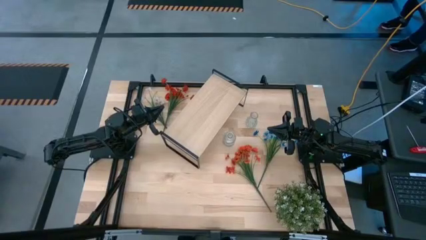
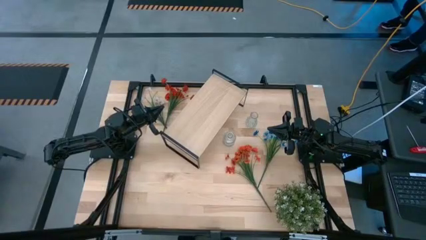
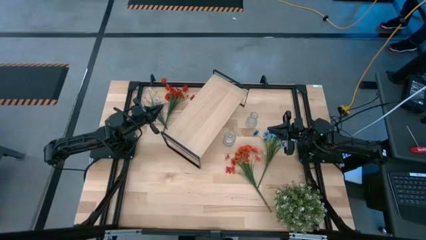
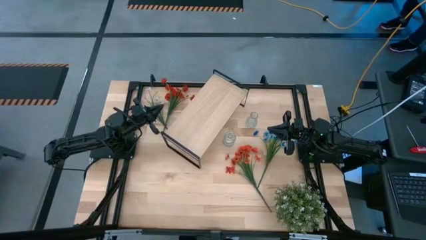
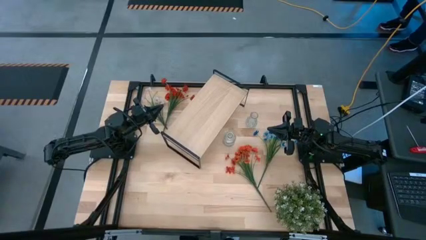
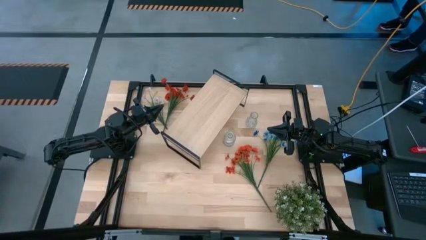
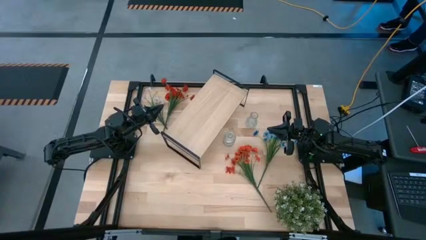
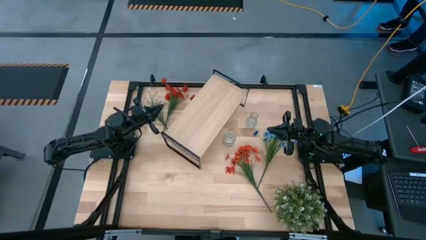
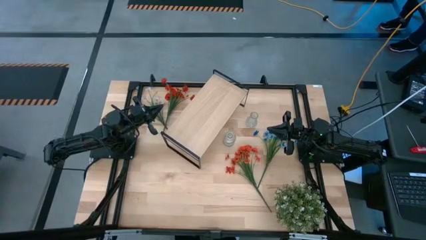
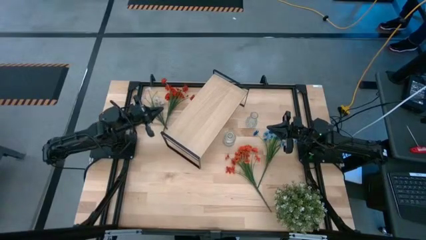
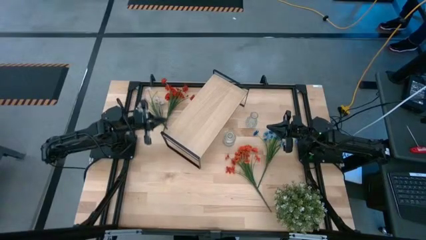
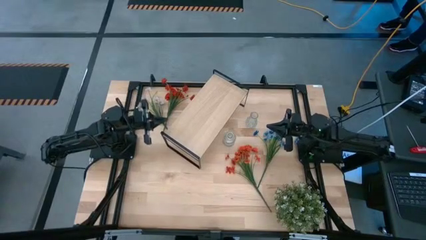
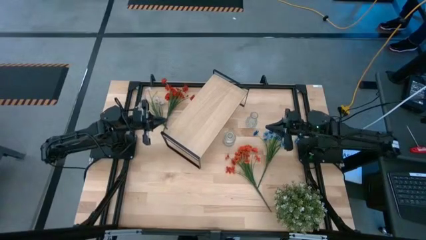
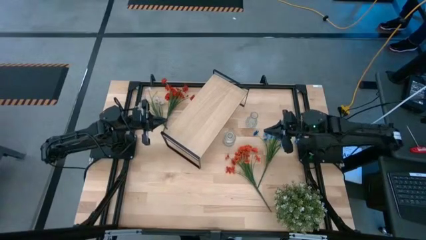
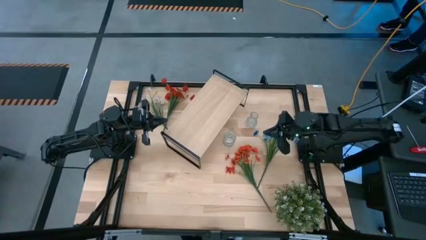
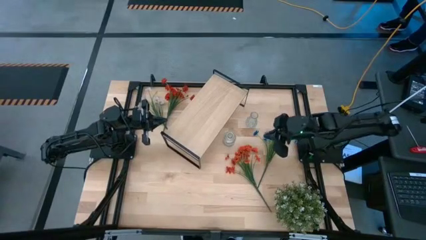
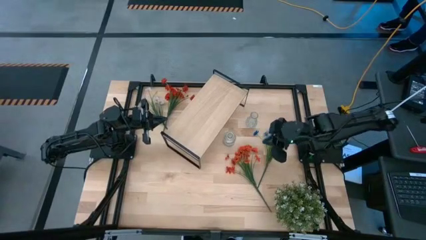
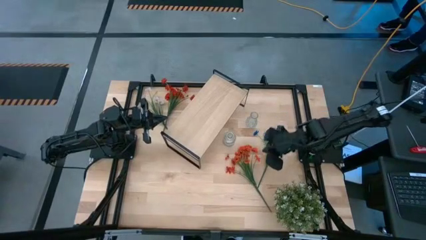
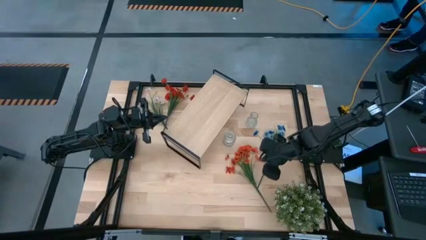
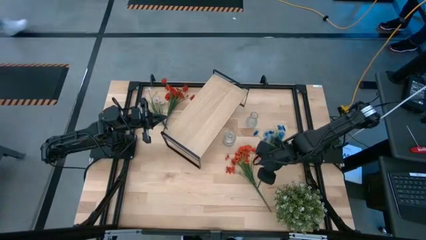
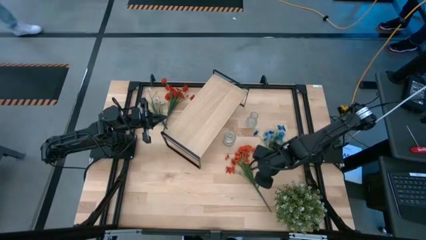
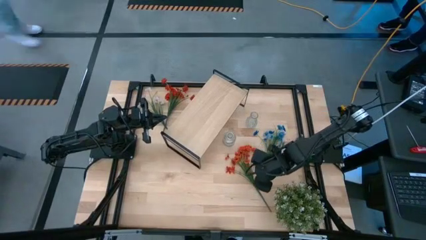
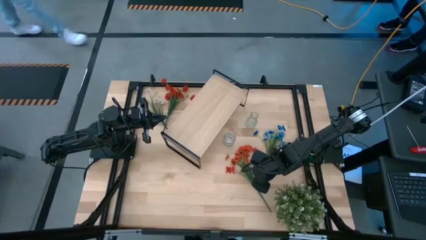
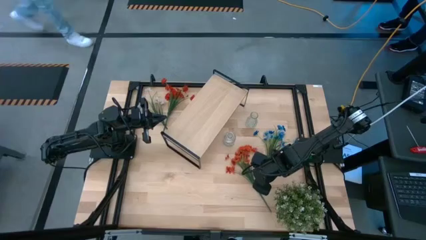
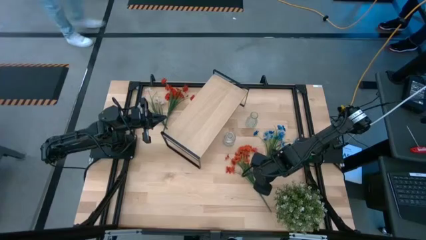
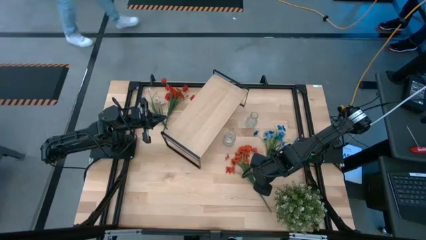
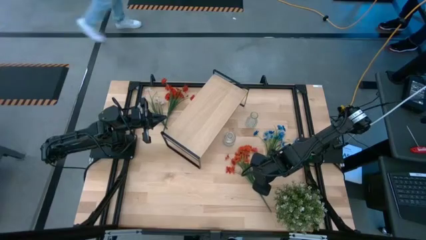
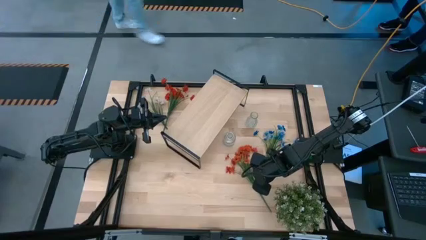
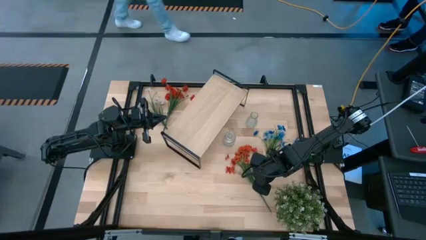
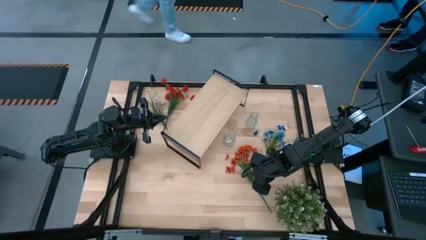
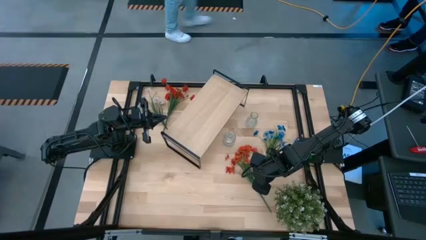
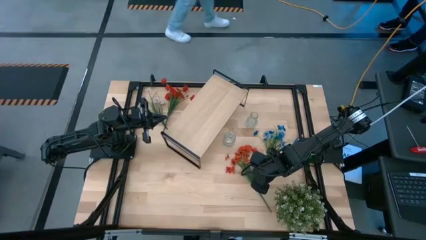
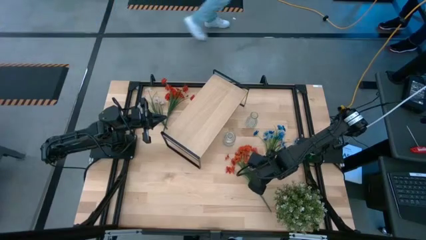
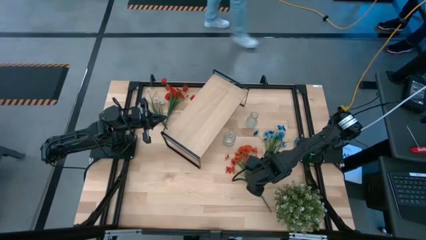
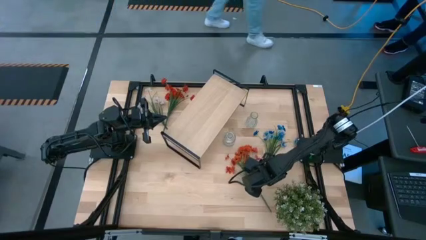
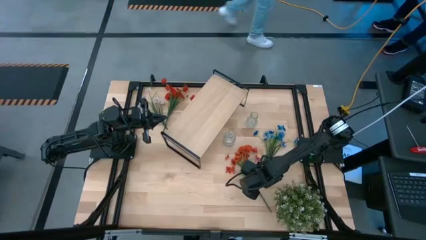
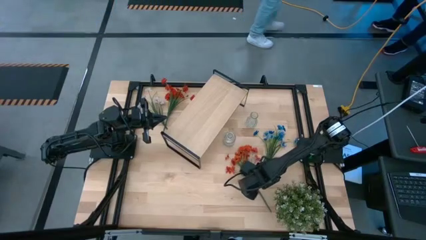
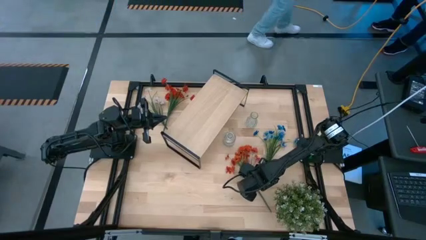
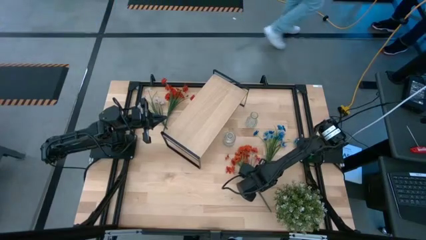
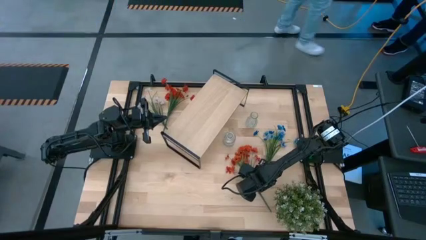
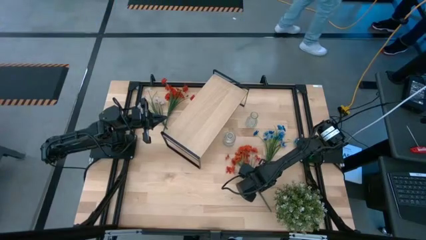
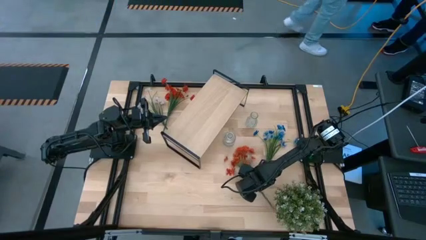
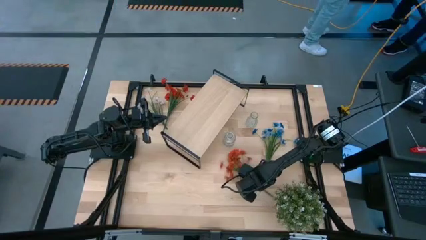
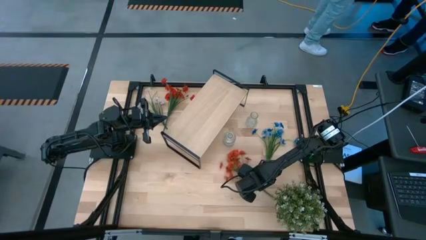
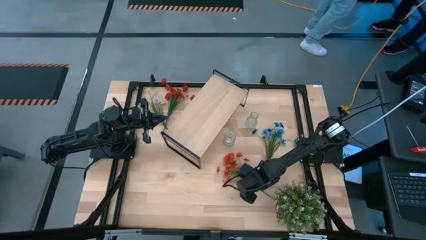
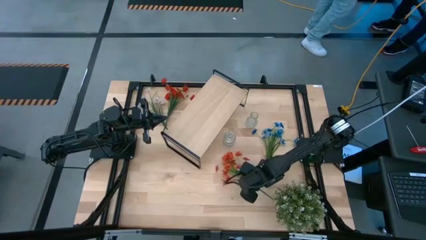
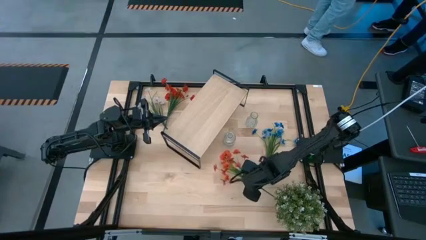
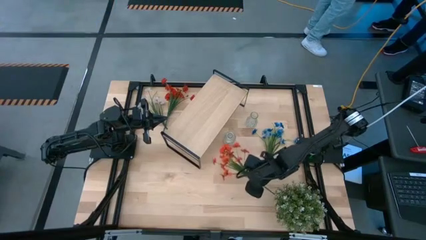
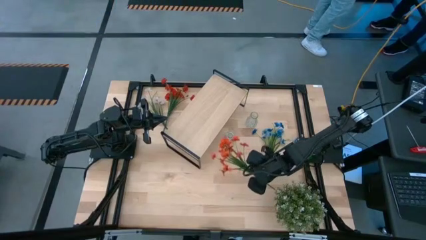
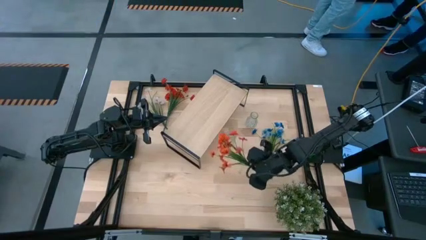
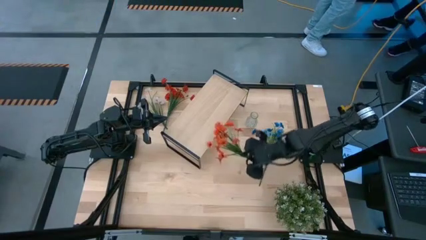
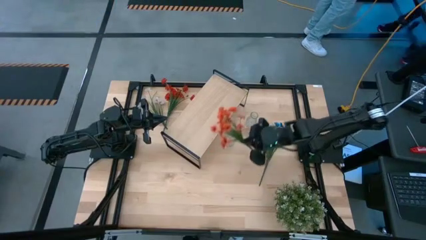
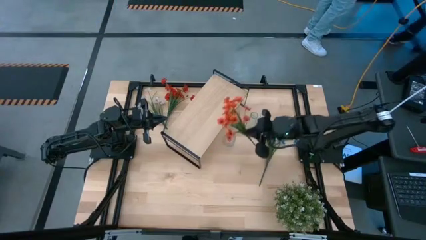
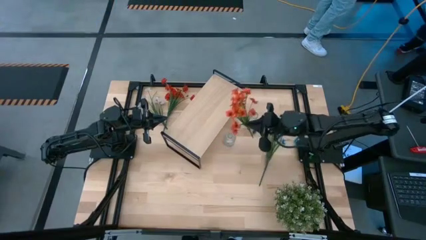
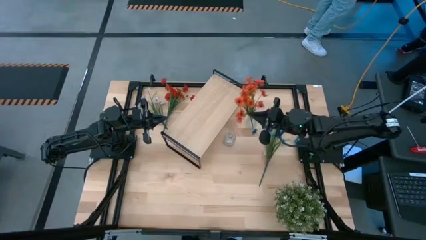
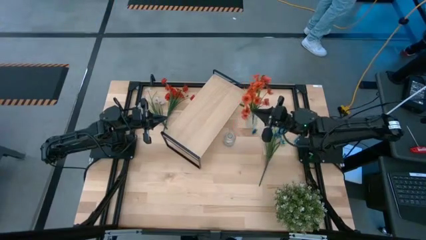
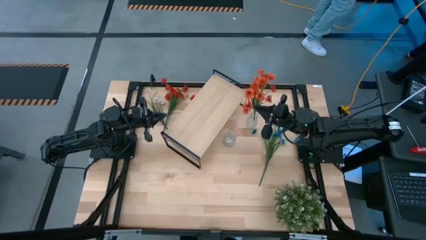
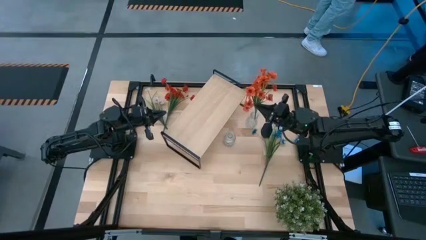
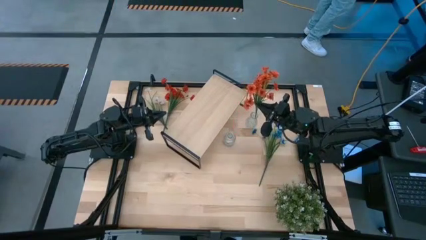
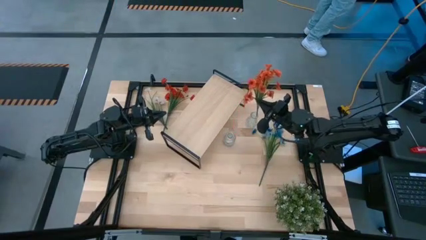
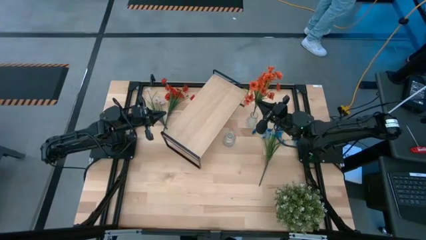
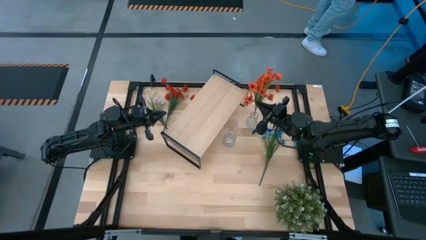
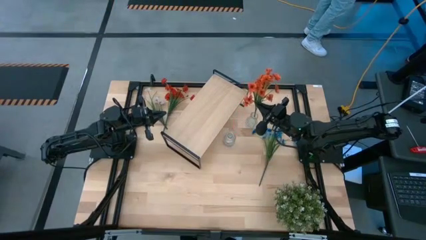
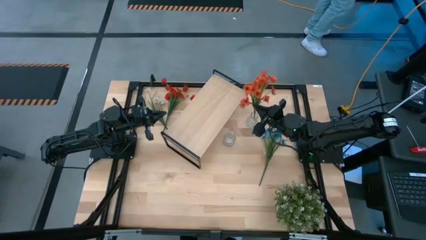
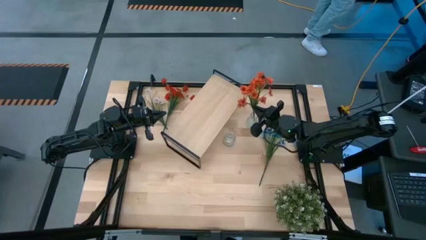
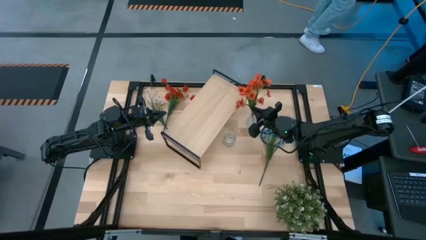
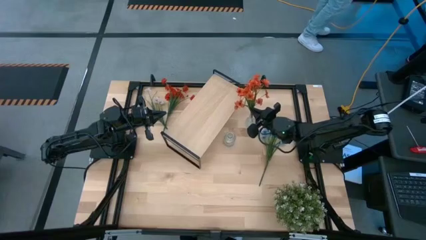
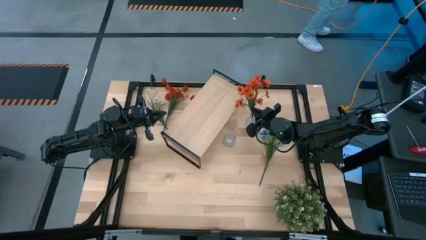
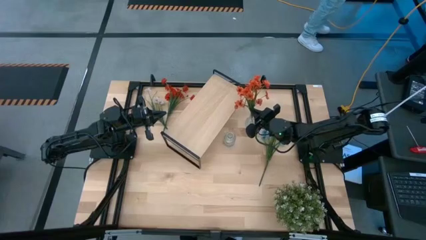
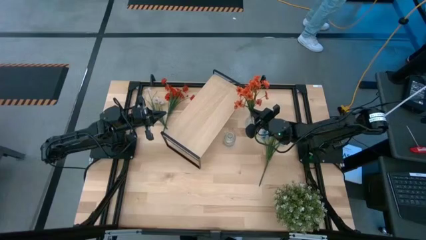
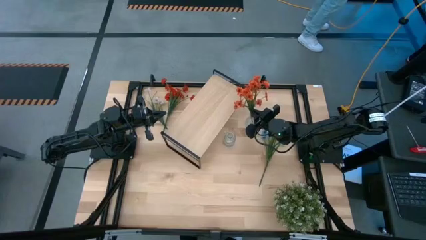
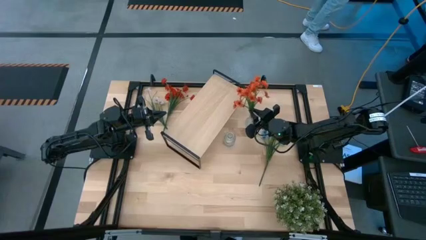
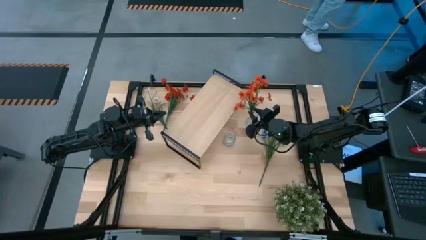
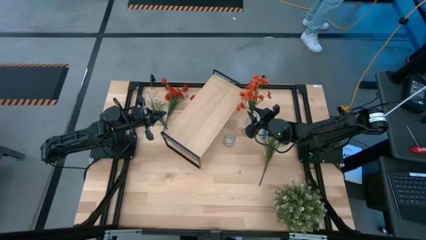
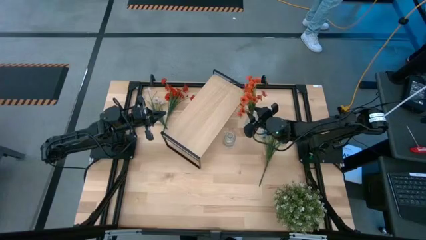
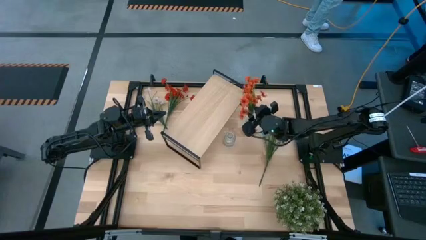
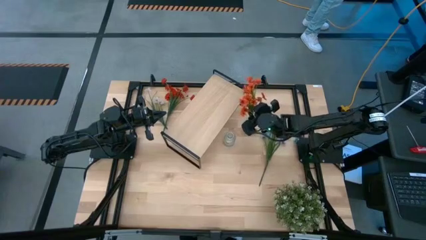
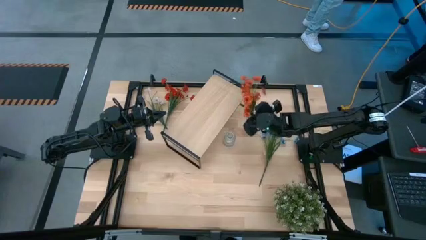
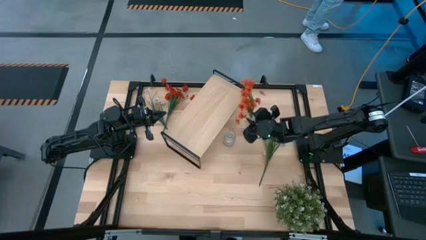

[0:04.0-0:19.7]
Task: Pick and place flowers into a vace then onto a shelf
Put the orange flowers into the right transparent vase
